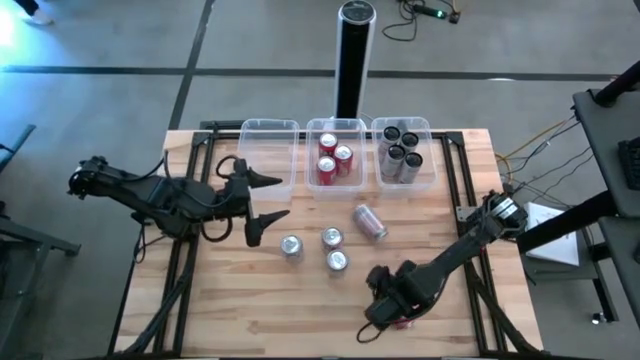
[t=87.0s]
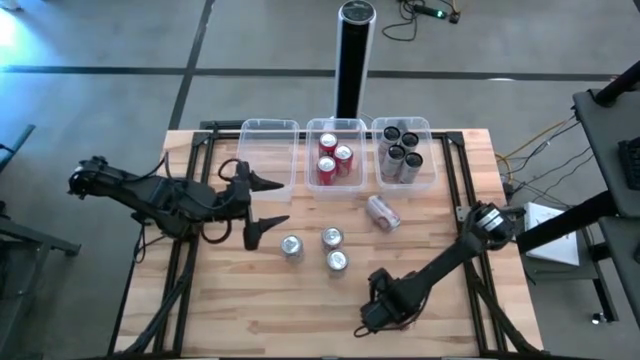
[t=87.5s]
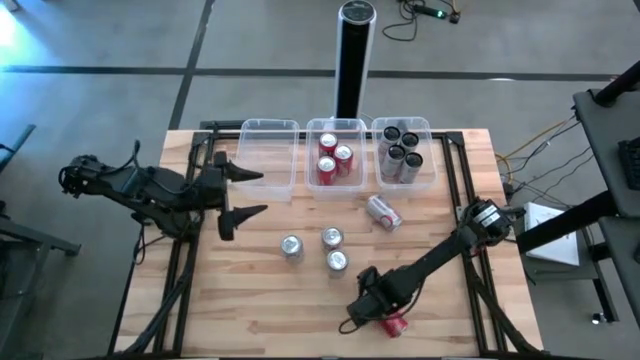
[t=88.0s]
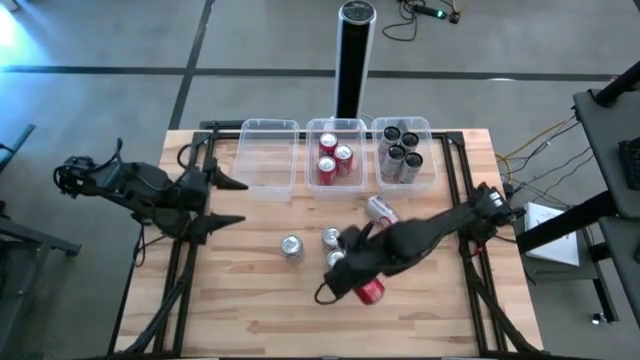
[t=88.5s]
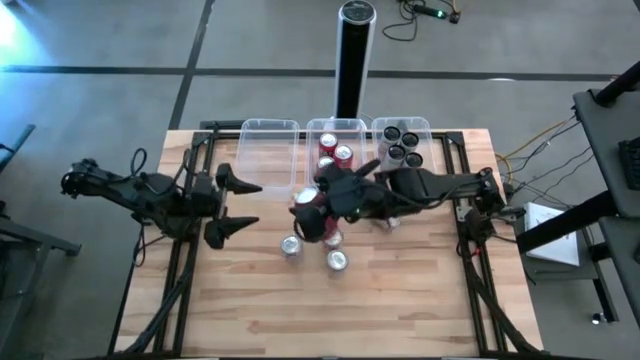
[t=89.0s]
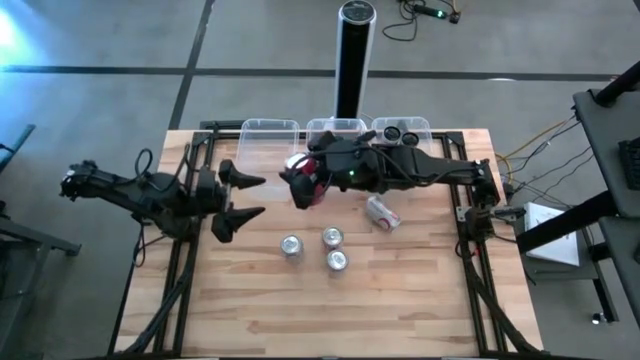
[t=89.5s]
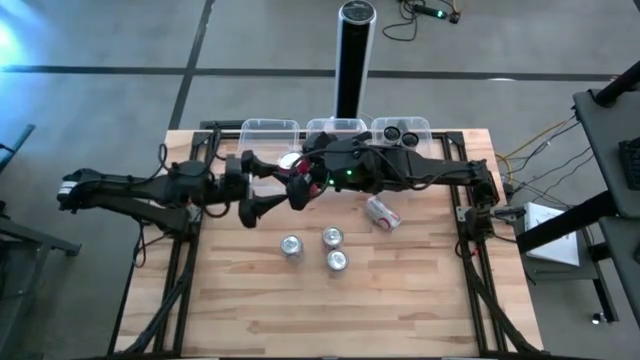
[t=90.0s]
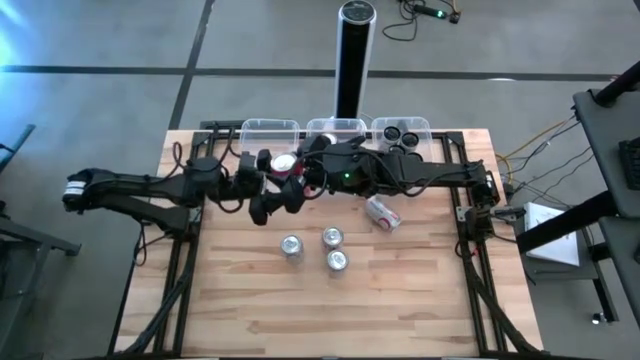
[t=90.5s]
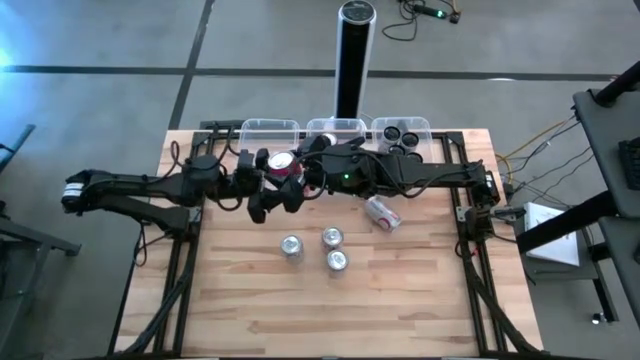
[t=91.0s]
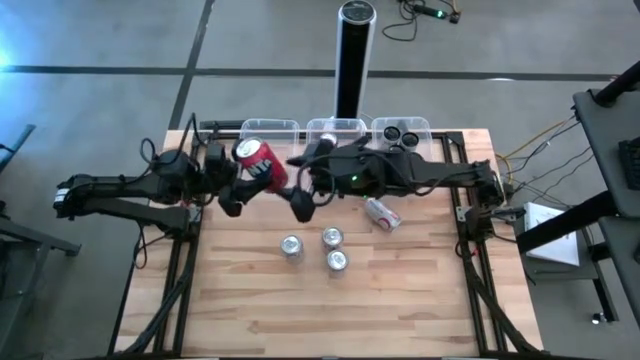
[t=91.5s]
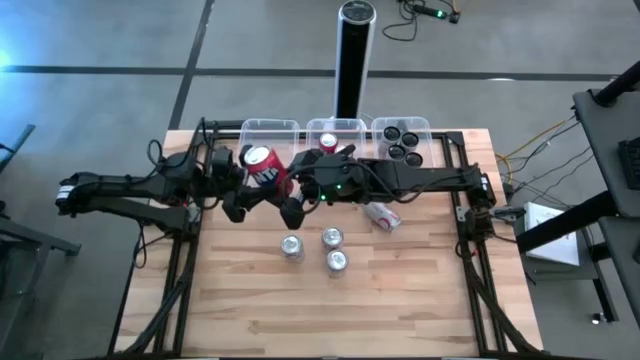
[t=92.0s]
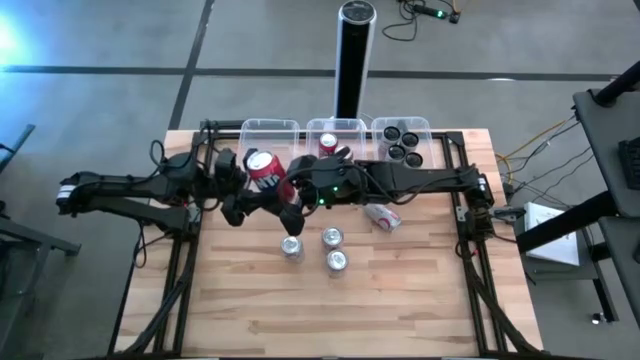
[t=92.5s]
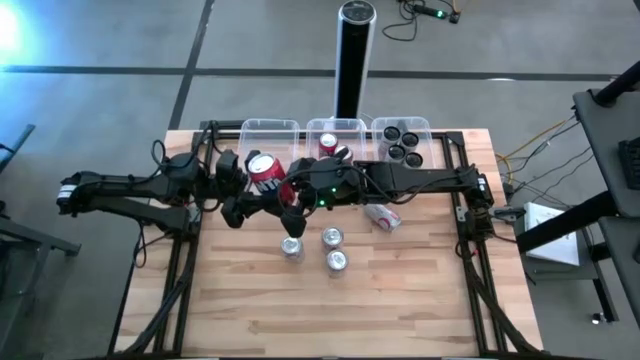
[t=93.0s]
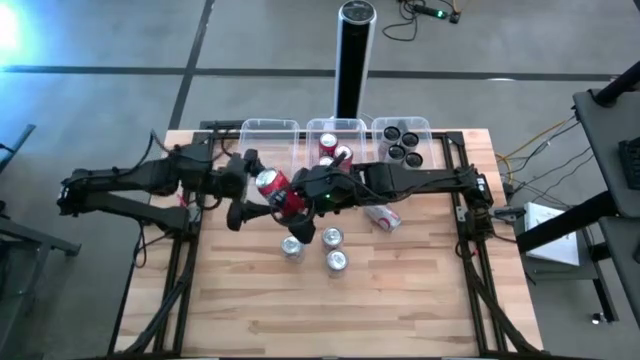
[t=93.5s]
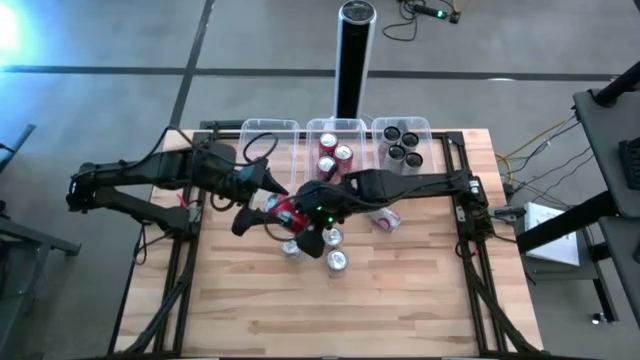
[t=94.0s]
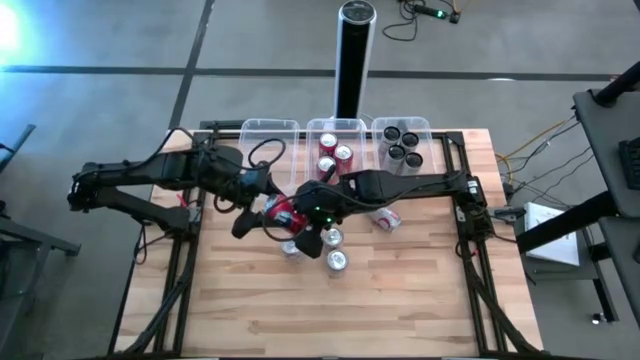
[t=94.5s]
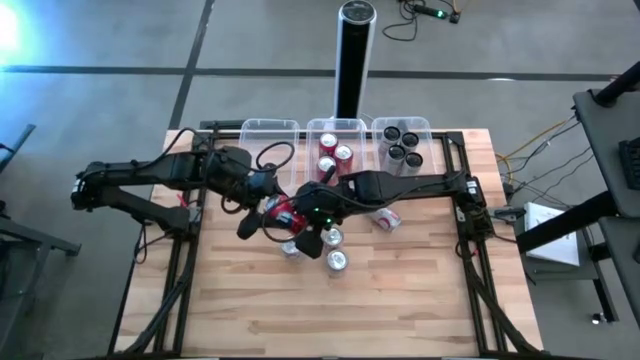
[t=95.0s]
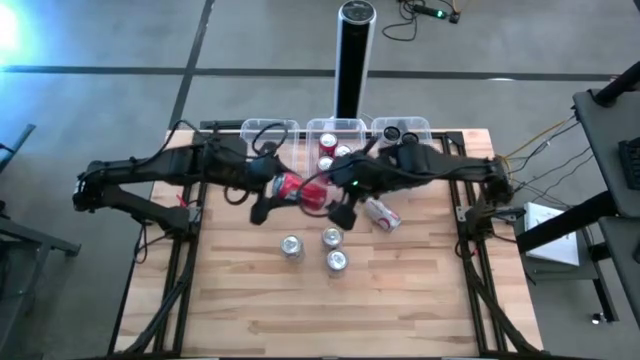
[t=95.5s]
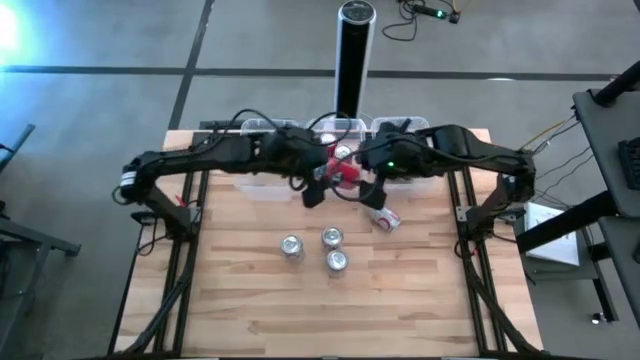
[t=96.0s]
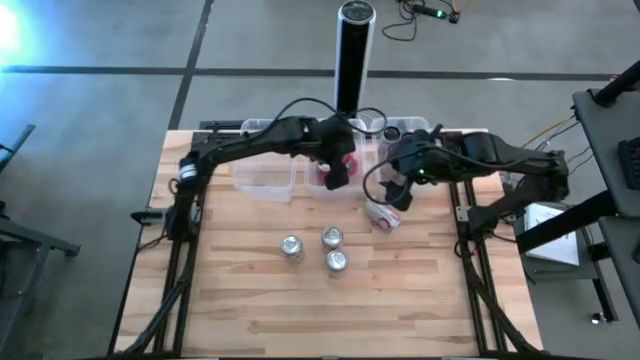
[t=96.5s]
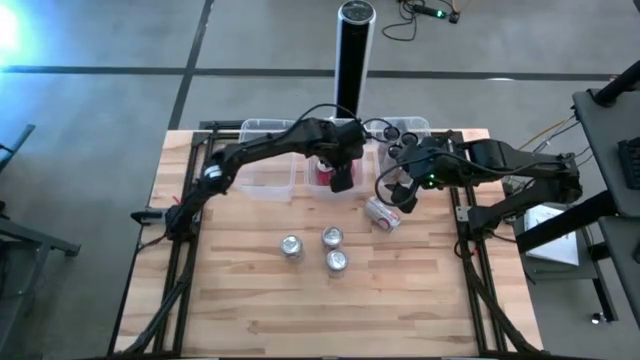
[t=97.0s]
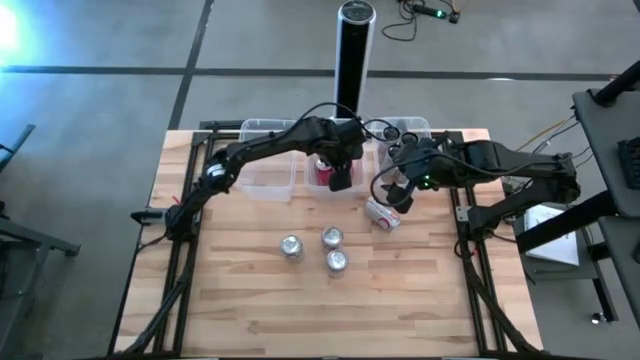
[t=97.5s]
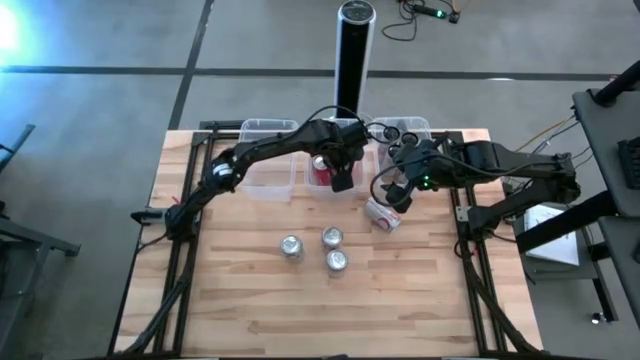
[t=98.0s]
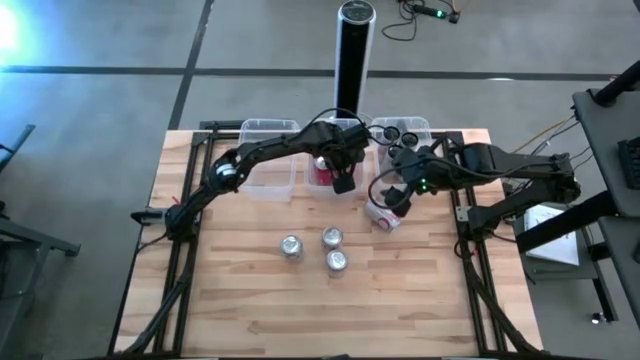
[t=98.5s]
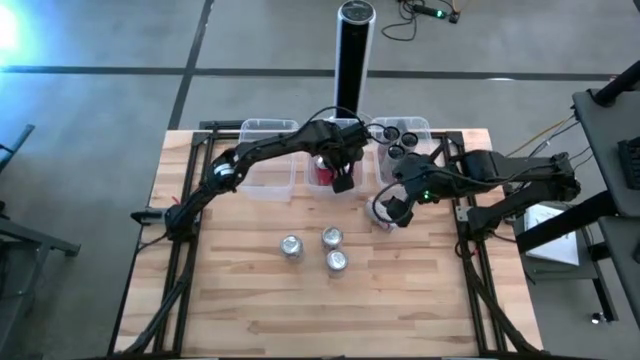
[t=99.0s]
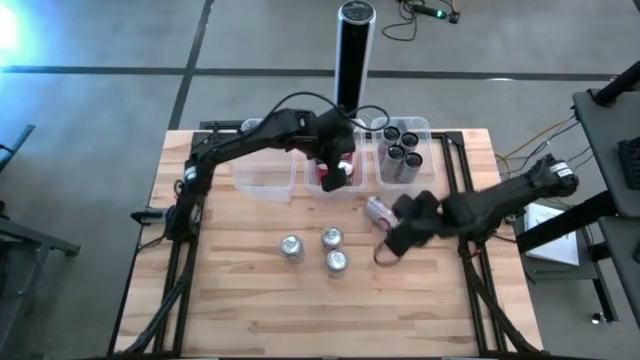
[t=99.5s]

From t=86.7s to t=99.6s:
Task: Sort soda cans
Put the red soda can into the middle white bin

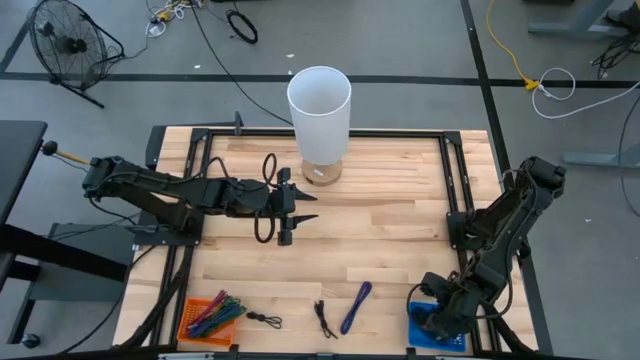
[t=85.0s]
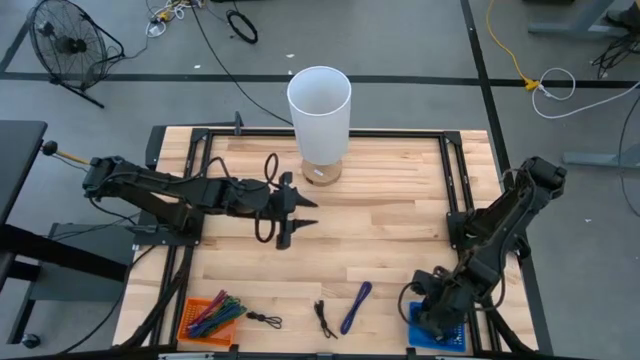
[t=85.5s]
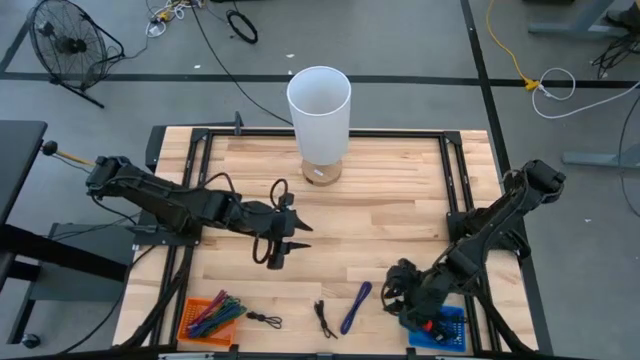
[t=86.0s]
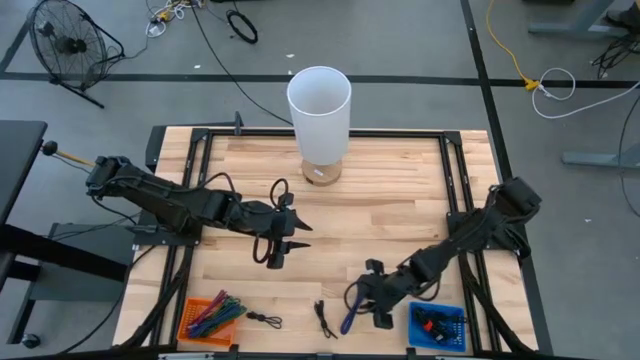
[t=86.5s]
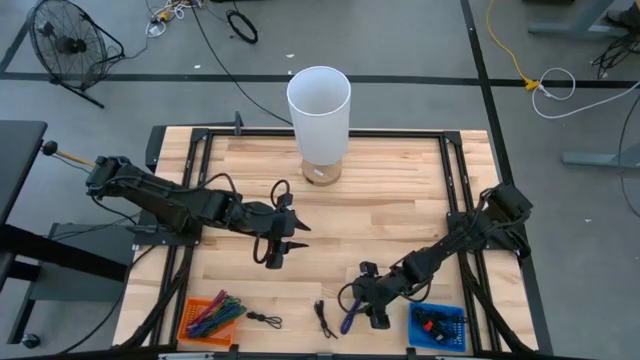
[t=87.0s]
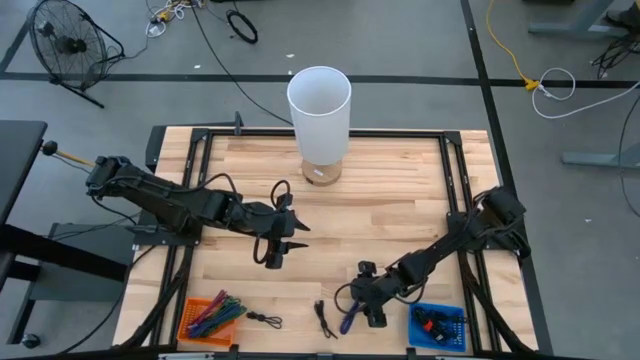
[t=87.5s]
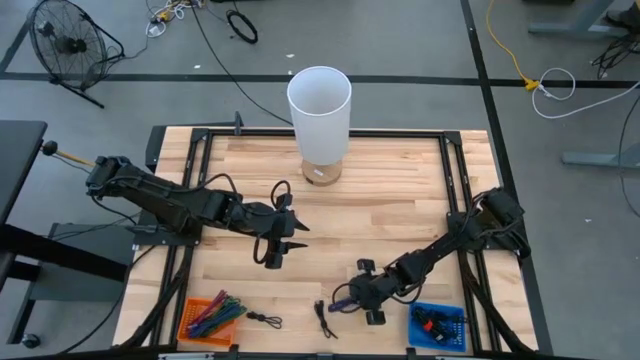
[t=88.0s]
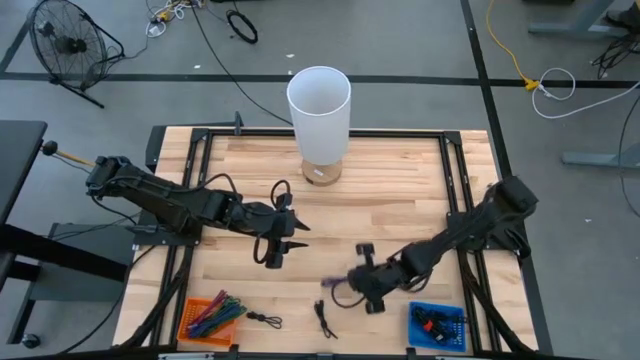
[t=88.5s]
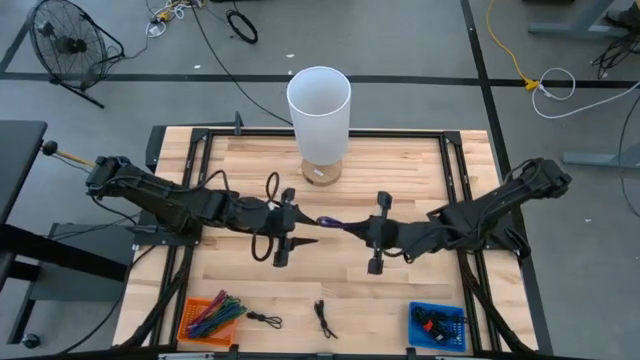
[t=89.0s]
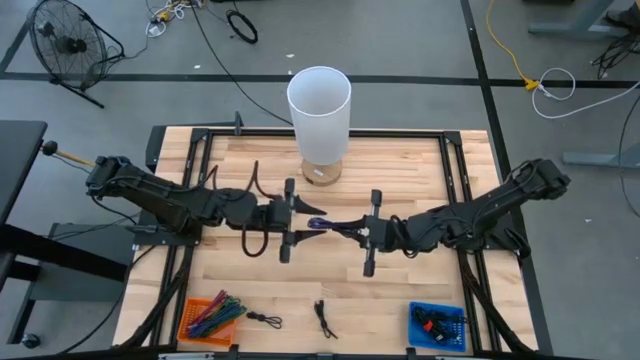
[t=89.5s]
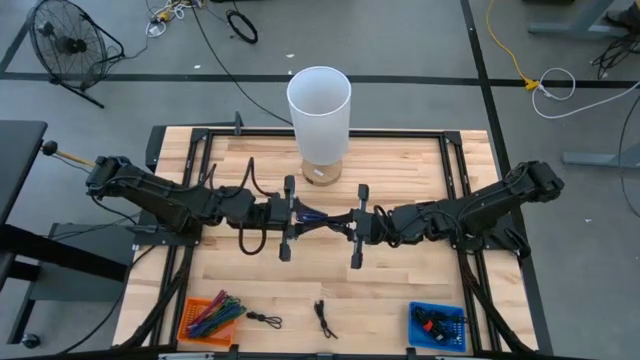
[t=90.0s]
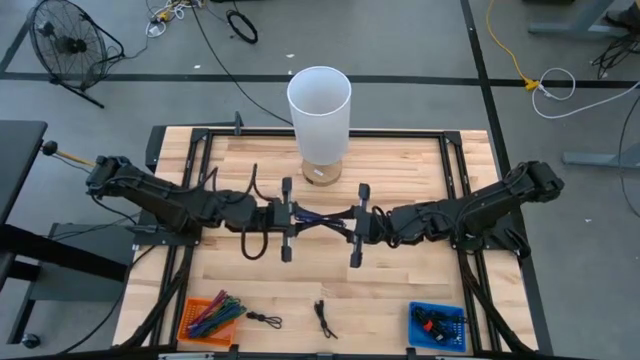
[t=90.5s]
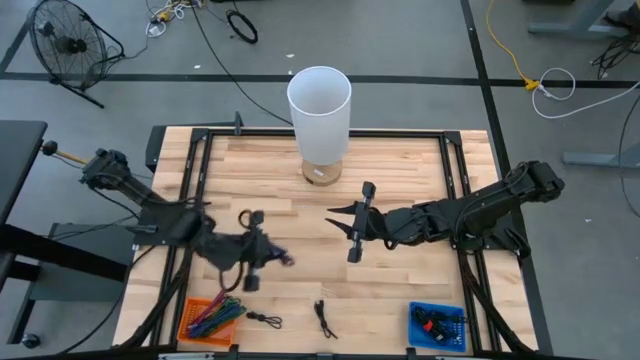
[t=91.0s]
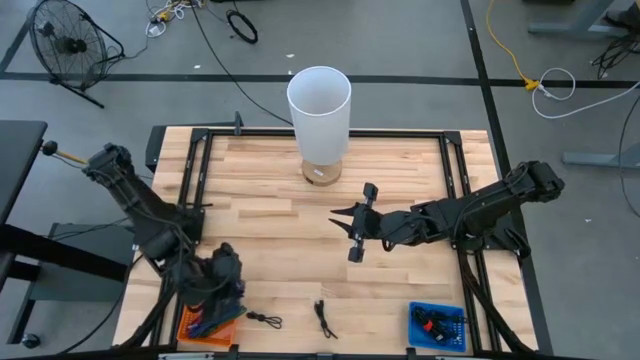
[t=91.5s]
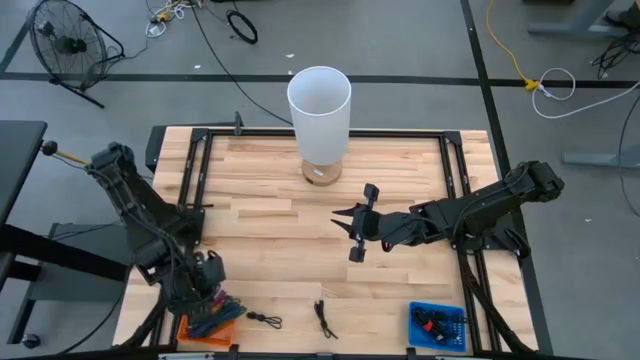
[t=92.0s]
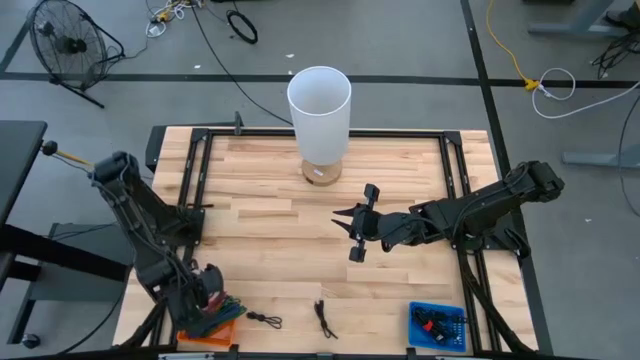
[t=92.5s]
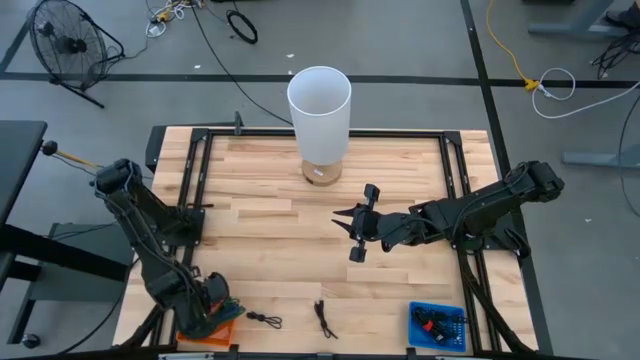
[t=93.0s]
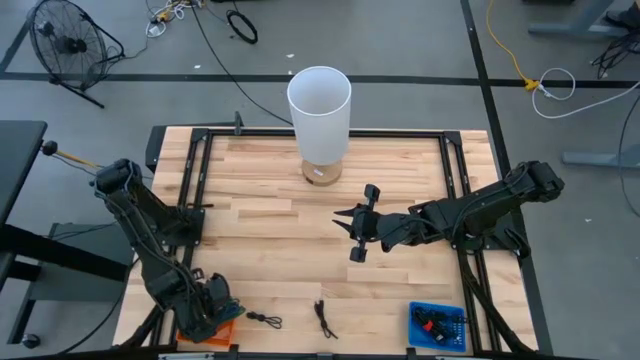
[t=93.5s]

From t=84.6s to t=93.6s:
Task: Pick & Place USB Port
Put the black and violet charger cable into the orange bin
